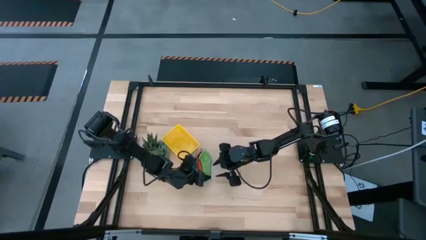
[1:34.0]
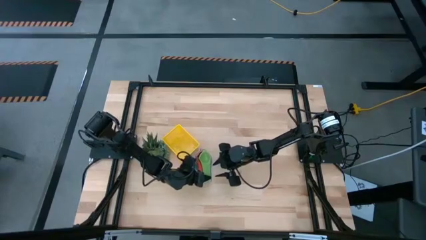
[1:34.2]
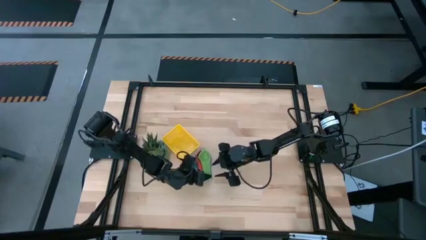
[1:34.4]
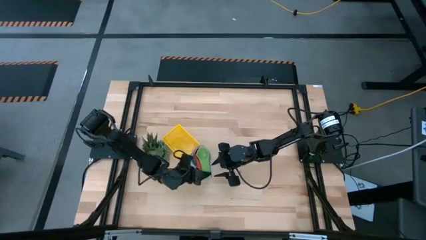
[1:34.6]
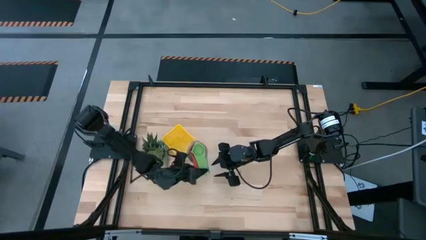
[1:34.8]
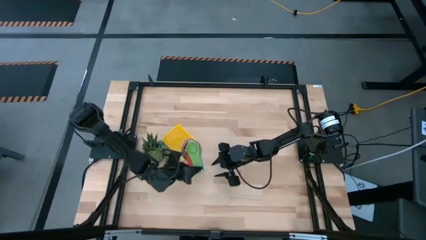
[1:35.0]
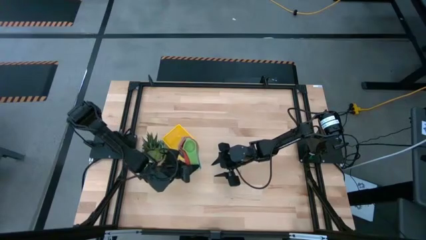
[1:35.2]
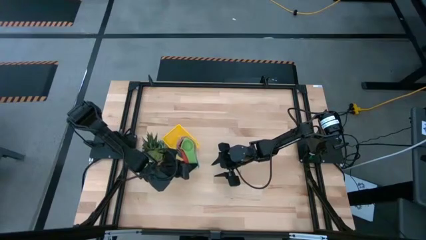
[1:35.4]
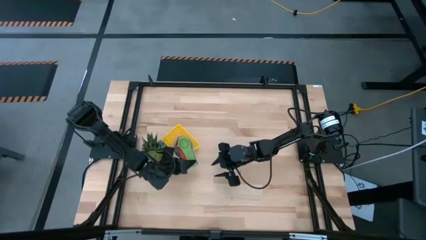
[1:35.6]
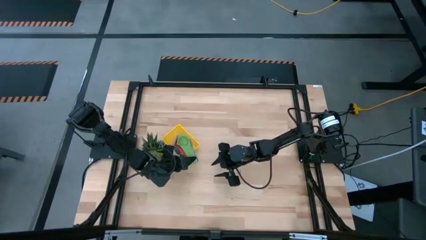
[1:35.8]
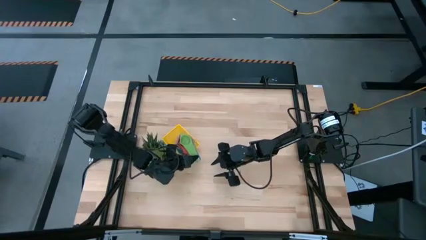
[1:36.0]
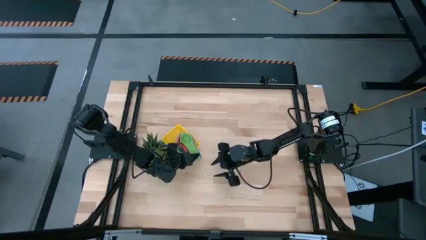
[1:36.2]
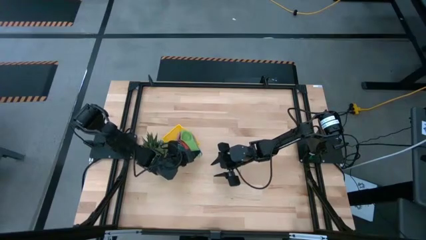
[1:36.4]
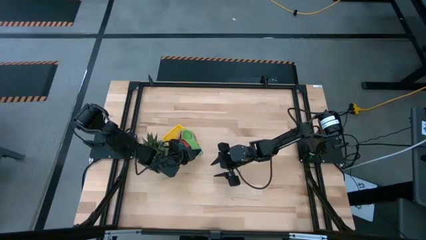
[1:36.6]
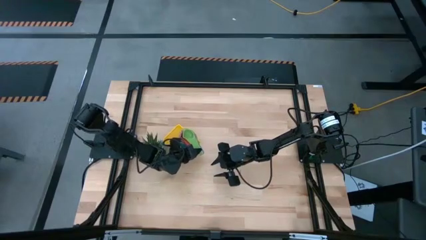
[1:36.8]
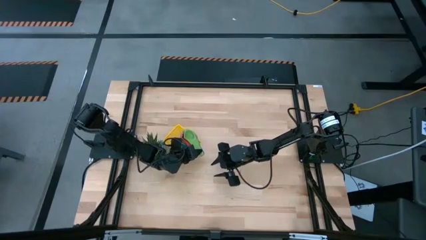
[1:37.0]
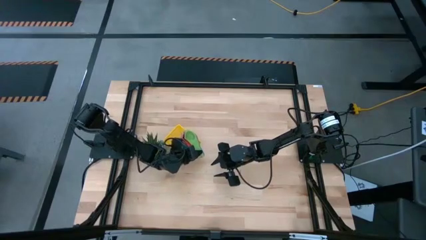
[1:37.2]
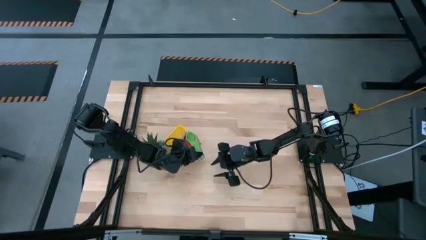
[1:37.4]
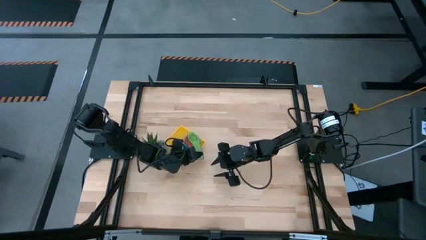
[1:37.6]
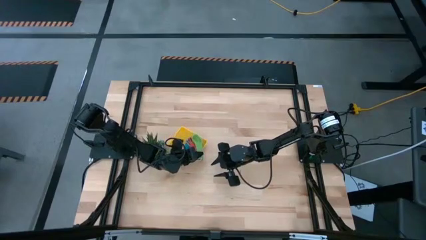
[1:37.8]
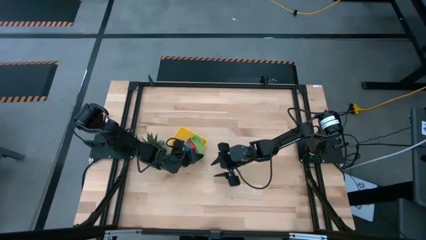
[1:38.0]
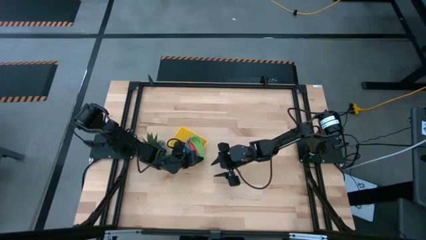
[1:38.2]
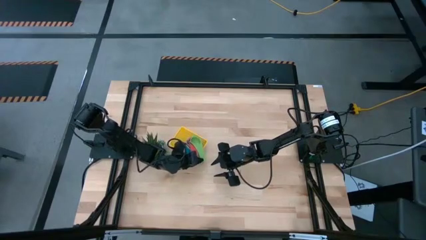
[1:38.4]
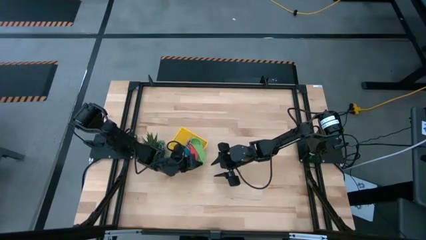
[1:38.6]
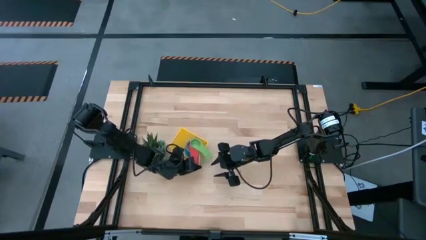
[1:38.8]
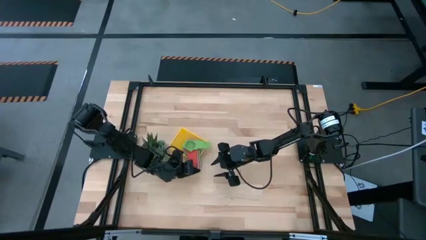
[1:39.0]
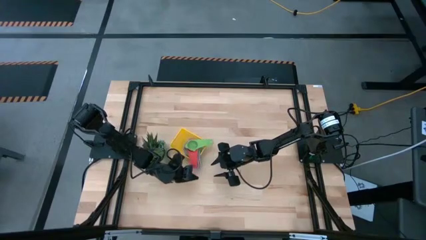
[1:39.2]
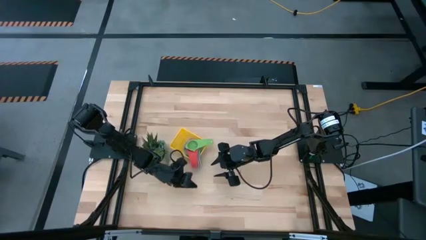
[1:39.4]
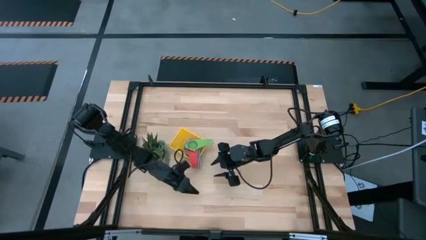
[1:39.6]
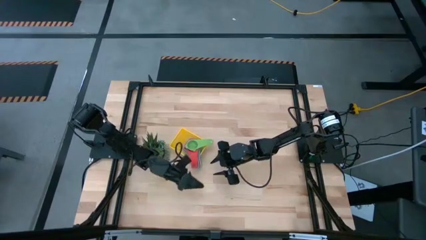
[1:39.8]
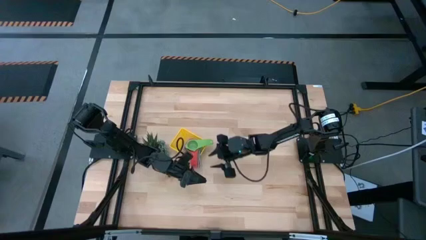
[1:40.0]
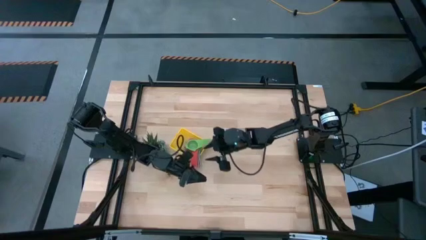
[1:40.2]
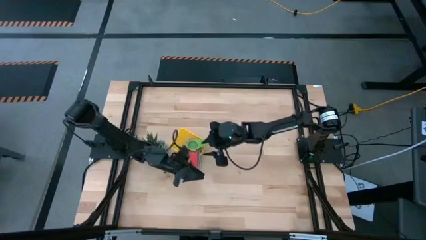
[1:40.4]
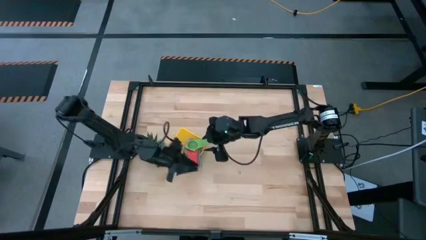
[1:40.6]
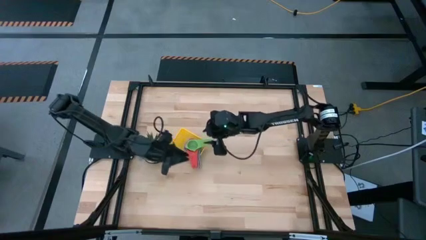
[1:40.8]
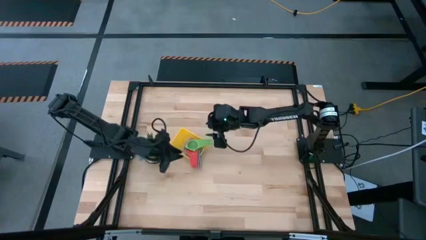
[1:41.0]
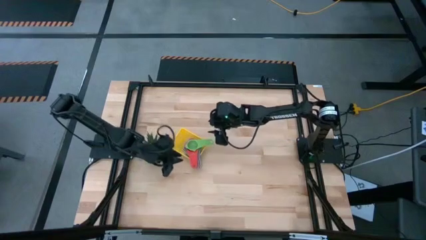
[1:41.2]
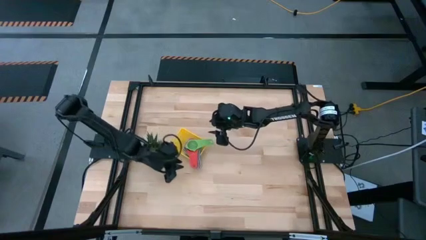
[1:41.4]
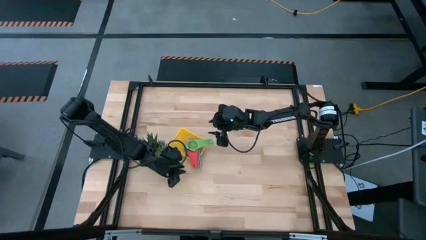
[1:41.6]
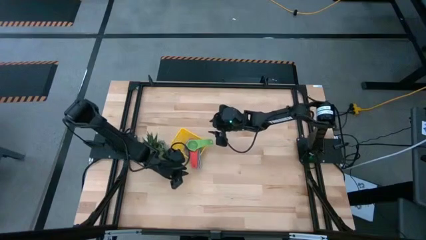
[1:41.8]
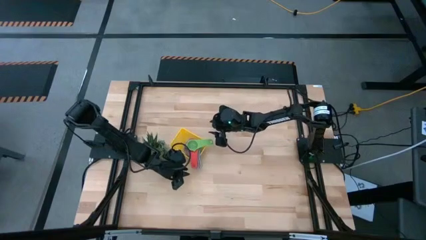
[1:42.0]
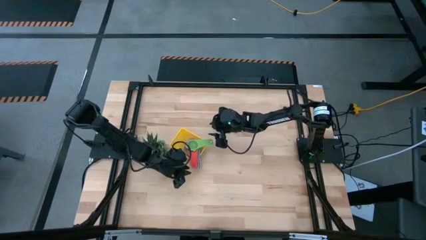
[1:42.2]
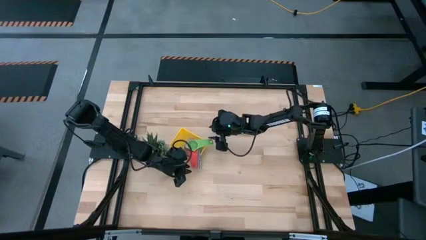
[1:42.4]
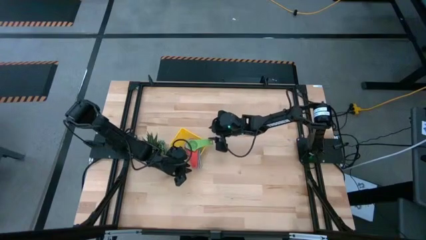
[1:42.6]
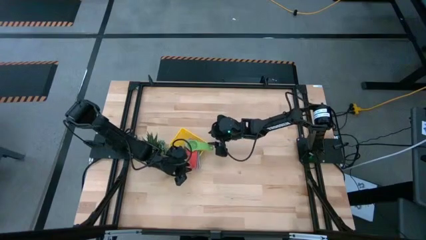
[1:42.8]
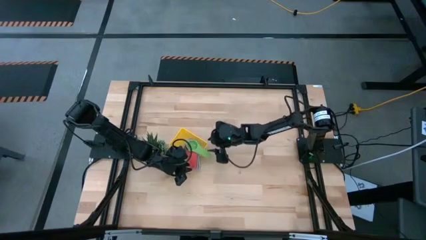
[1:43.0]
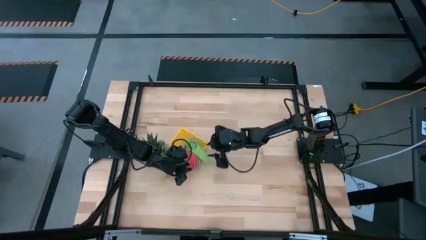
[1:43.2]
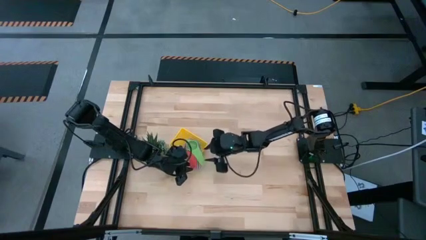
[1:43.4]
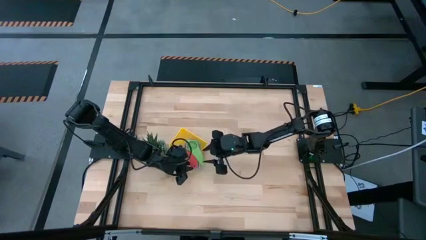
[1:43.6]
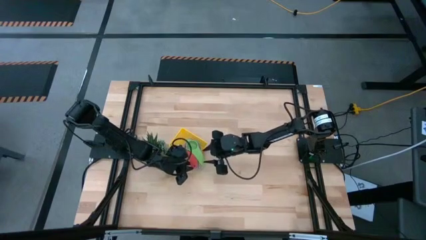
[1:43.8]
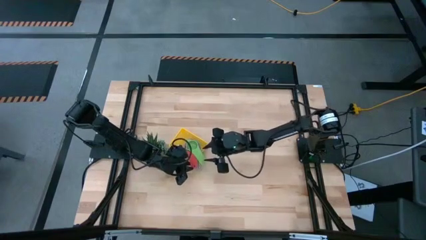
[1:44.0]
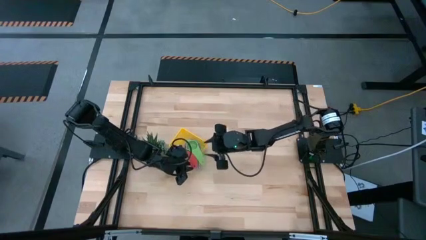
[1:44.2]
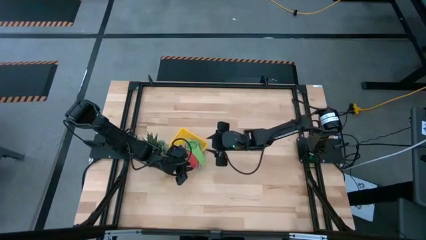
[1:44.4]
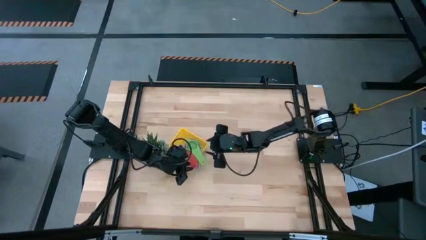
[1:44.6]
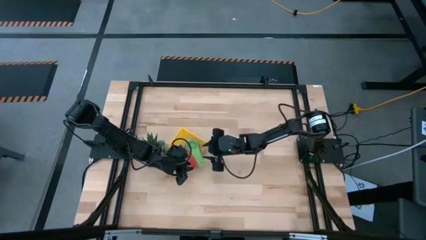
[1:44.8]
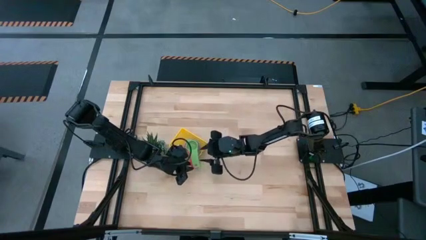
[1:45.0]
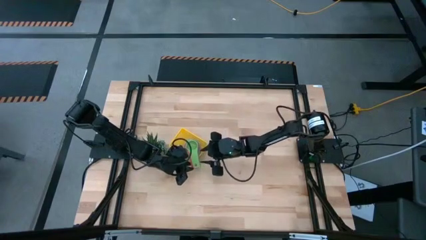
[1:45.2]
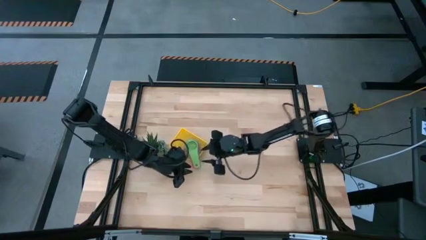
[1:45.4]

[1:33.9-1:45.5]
Task: Nest measuring cups in basket
Put the stacked measuring cups into the yellow bin

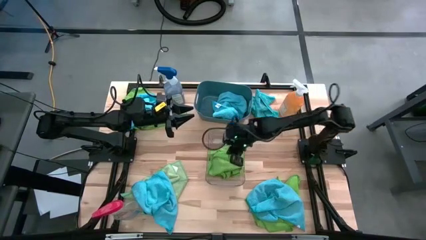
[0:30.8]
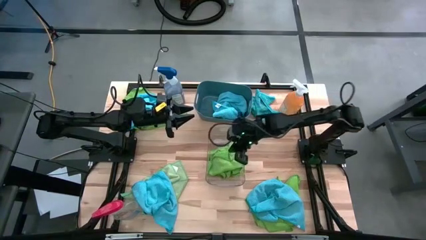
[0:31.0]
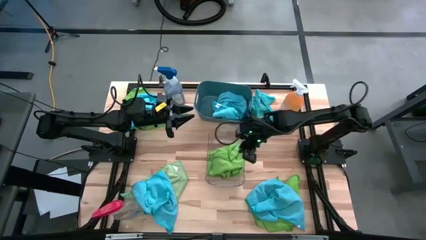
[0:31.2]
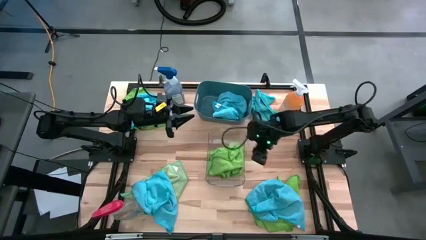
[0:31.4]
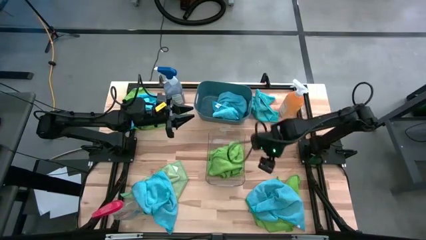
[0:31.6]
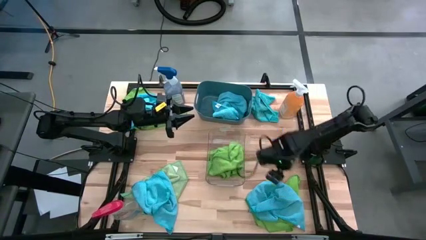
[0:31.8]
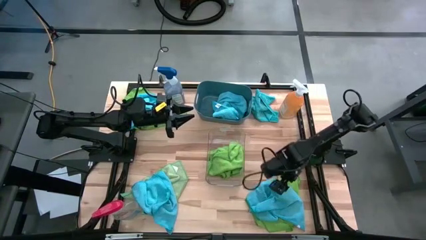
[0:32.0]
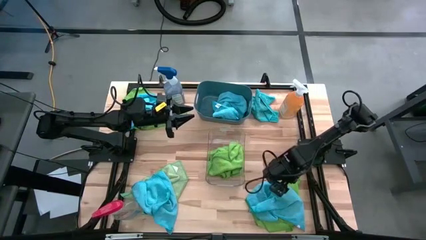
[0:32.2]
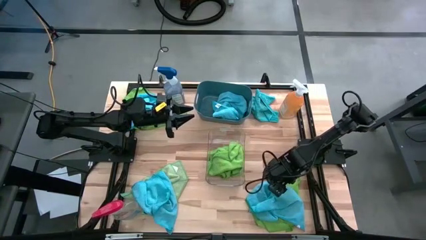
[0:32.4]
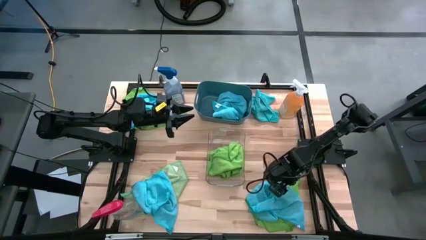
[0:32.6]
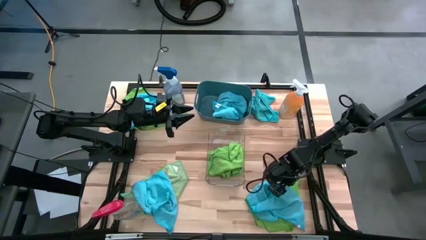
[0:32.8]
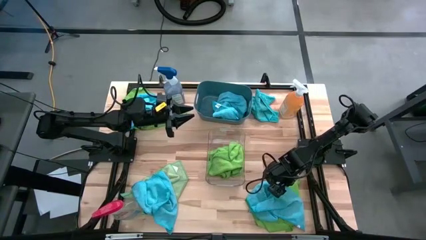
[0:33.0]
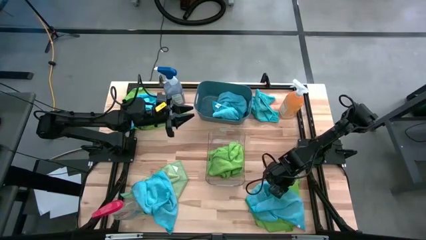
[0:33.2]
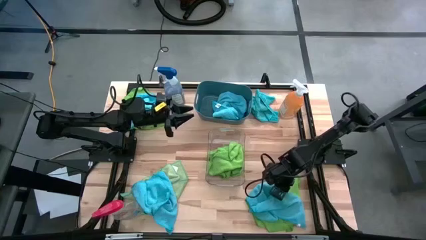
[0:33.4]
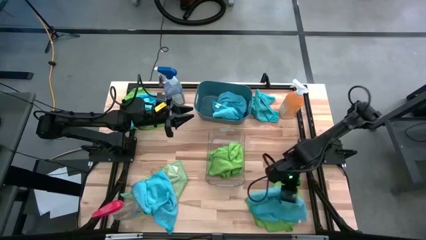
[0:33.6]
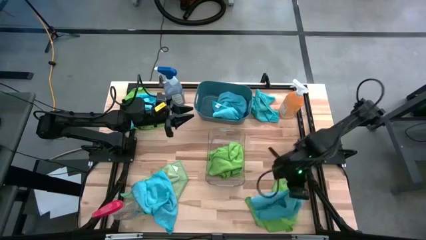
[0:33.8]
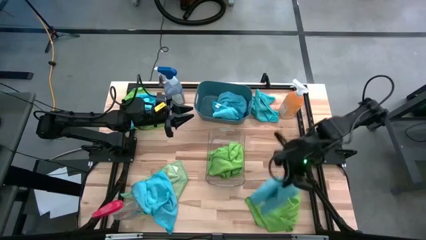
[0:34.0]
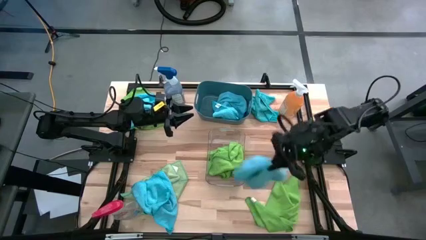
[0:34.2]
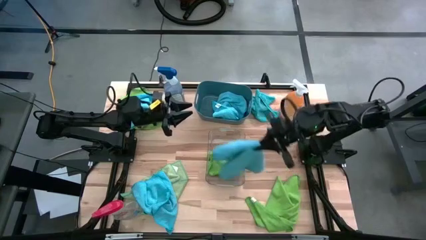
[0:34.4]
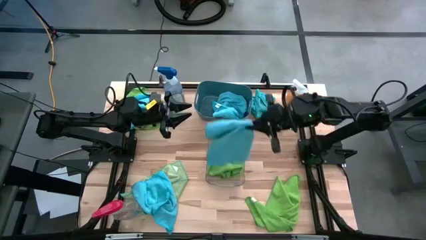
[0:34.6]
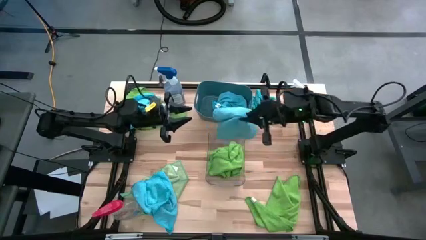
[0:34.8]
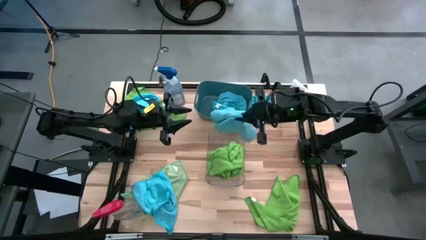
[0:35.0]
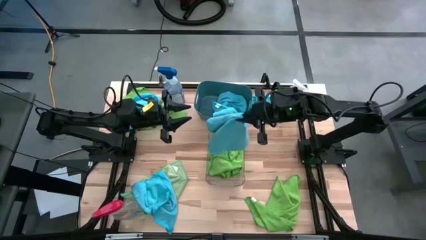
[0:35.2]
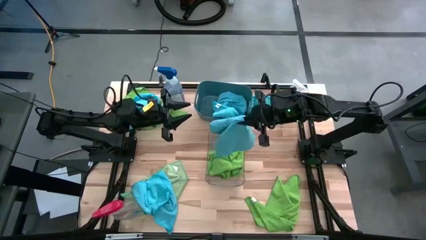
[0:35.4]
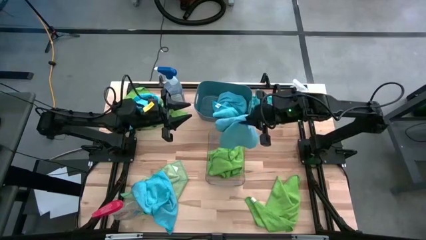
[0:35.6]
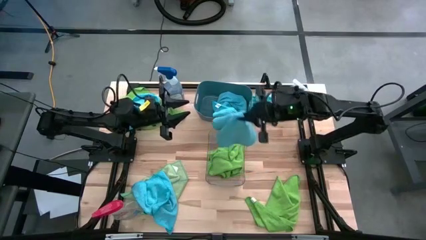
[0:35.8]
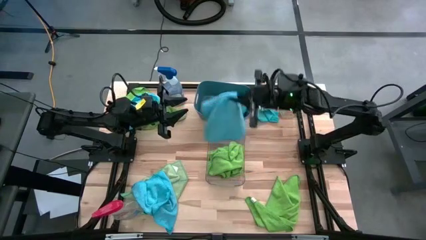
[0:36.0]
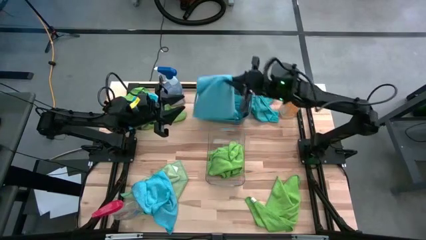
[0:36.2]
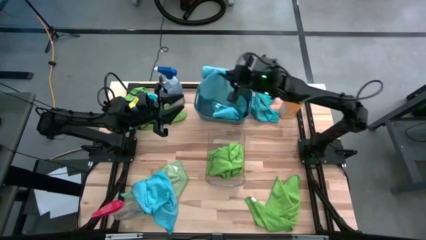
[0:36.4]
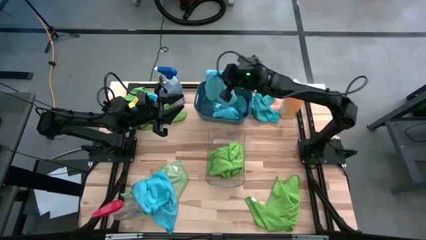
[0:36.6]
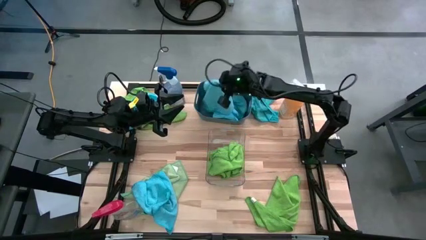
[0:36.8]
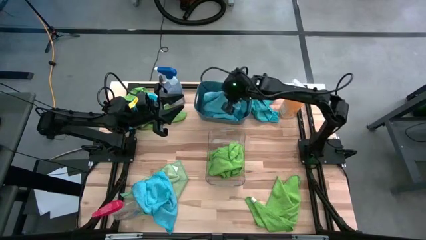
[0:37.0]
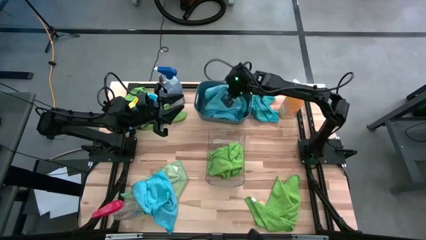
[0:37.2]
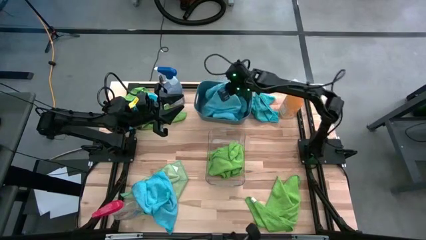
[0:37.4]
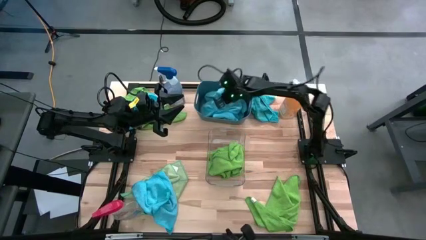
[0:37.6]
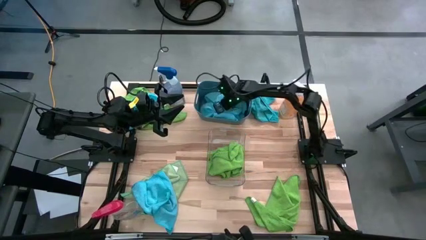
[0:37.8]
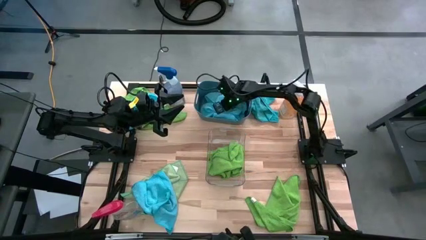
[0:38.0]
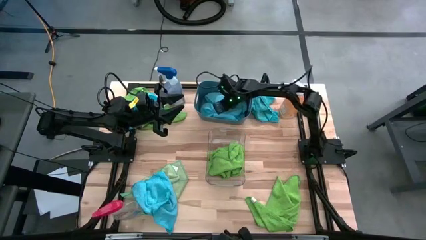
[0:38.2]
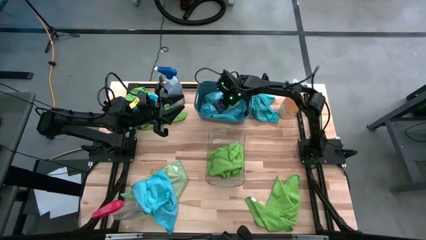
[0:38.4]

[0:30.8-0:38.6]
Task: Sort microfiber towel by color & place in baskets
Put the blue microfiber towel into the blue bin
